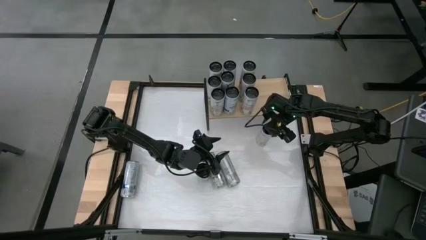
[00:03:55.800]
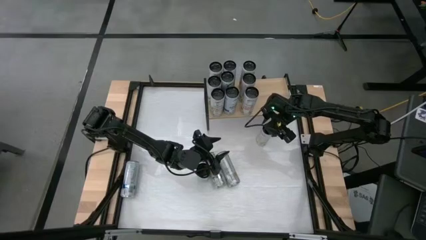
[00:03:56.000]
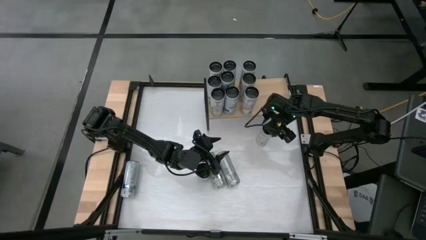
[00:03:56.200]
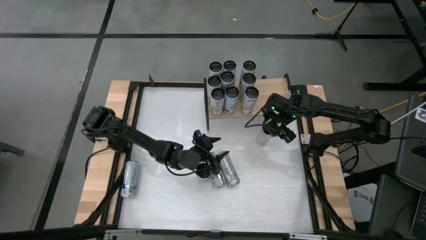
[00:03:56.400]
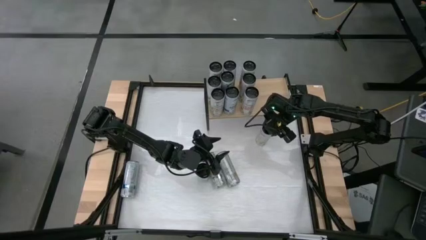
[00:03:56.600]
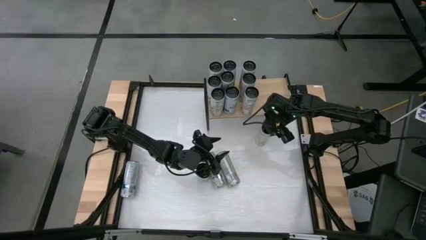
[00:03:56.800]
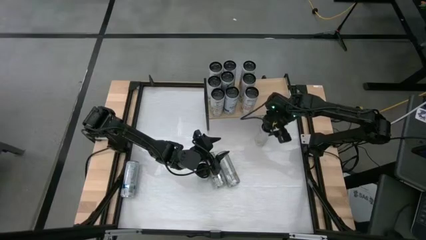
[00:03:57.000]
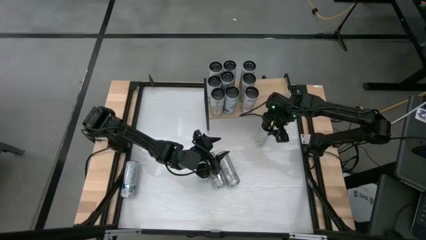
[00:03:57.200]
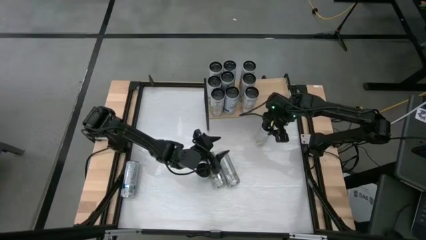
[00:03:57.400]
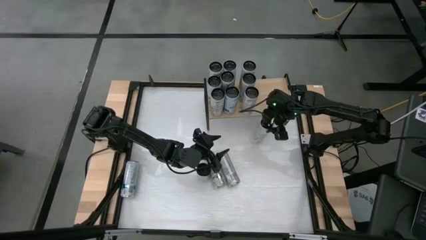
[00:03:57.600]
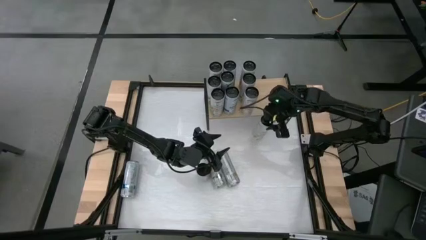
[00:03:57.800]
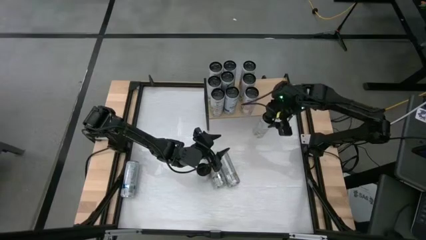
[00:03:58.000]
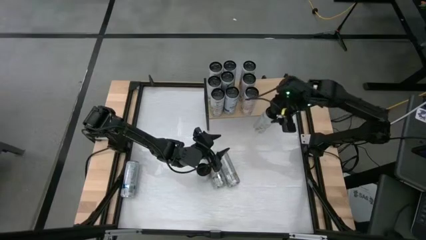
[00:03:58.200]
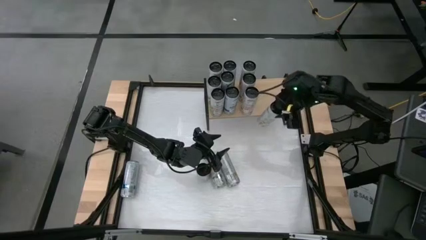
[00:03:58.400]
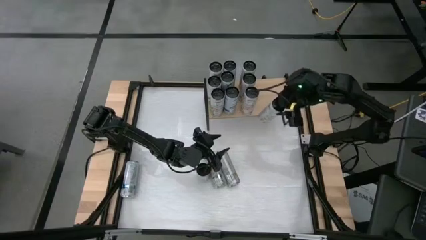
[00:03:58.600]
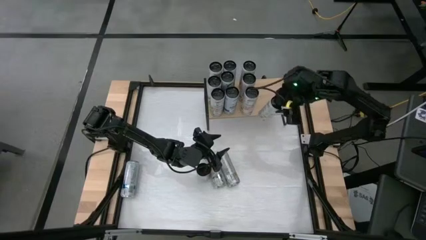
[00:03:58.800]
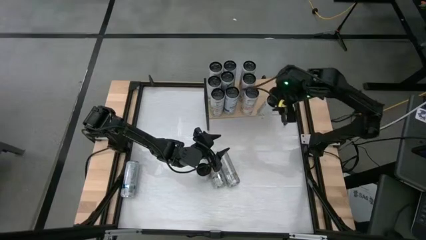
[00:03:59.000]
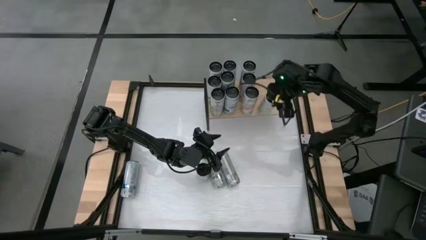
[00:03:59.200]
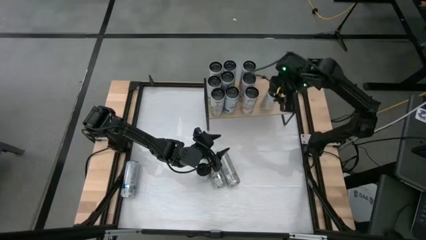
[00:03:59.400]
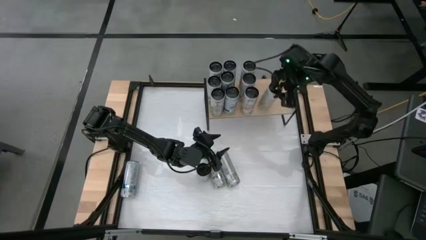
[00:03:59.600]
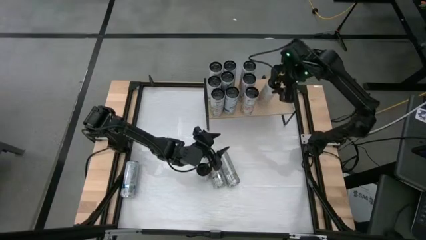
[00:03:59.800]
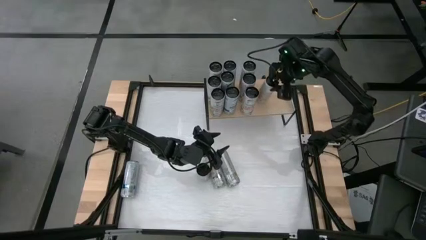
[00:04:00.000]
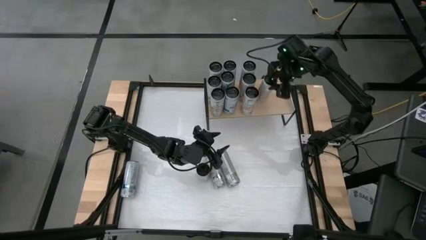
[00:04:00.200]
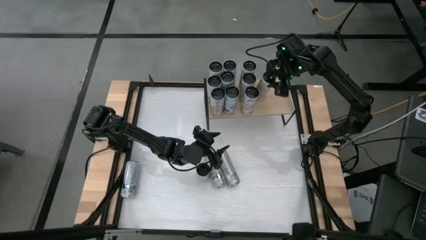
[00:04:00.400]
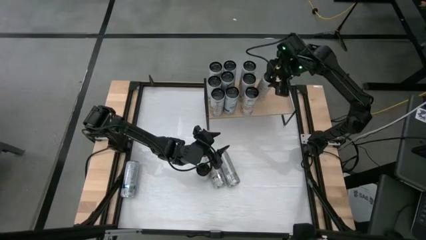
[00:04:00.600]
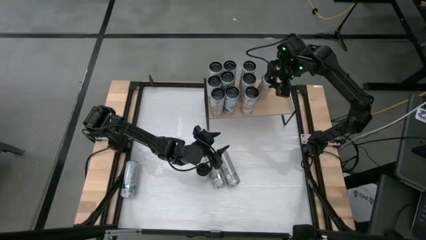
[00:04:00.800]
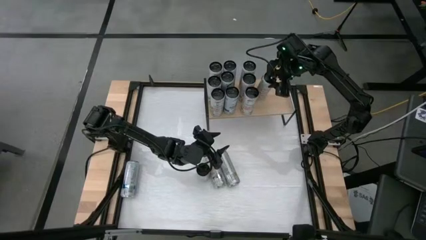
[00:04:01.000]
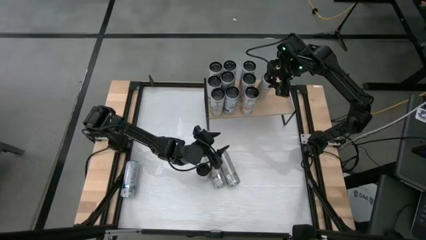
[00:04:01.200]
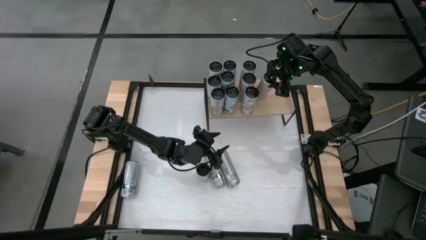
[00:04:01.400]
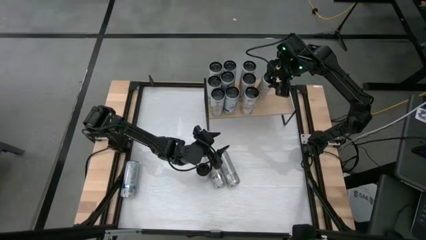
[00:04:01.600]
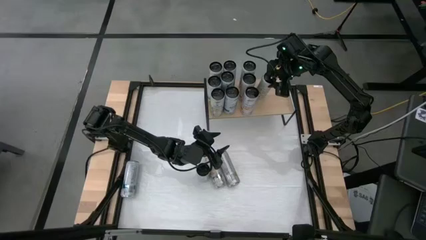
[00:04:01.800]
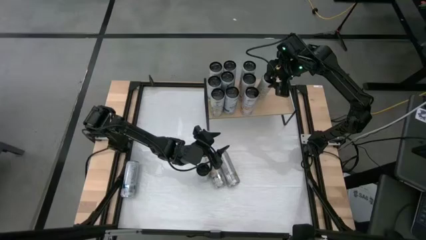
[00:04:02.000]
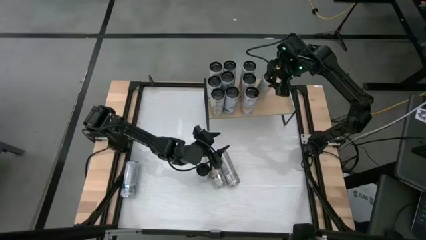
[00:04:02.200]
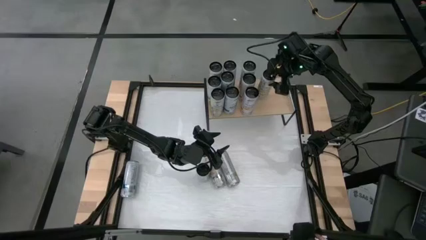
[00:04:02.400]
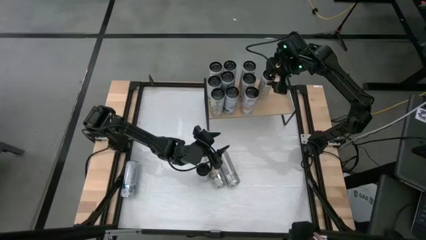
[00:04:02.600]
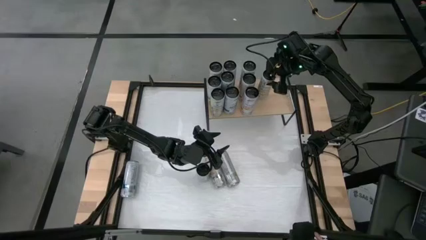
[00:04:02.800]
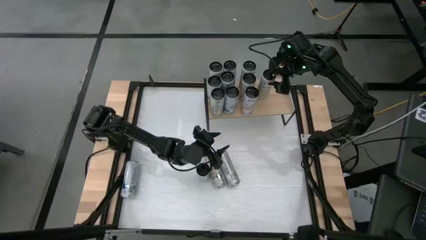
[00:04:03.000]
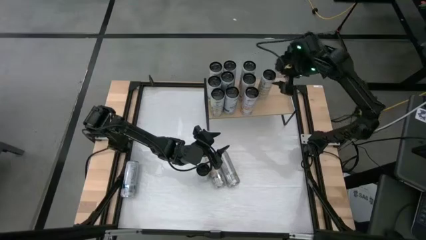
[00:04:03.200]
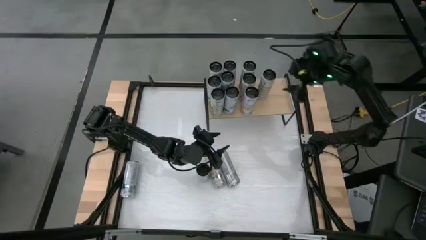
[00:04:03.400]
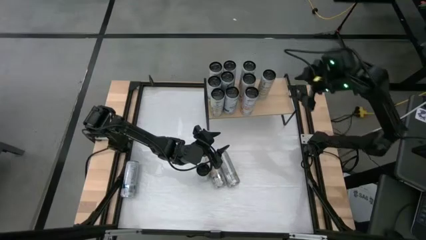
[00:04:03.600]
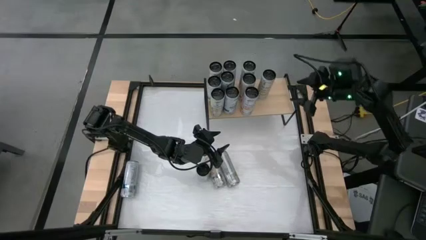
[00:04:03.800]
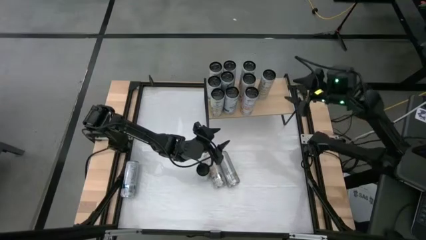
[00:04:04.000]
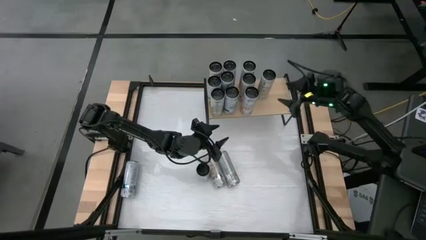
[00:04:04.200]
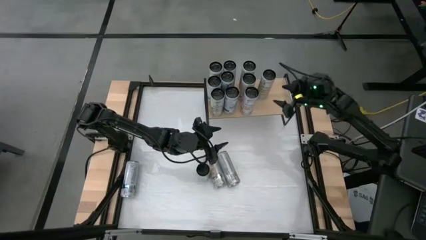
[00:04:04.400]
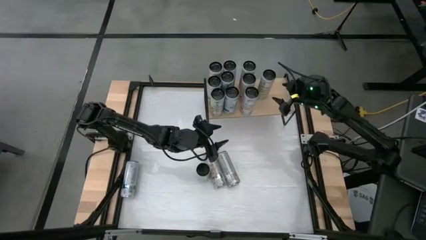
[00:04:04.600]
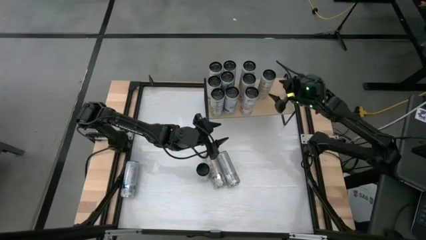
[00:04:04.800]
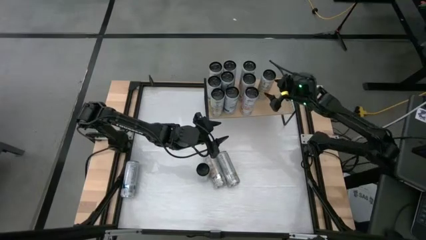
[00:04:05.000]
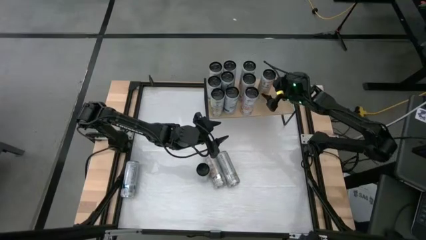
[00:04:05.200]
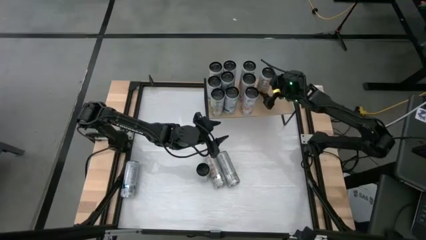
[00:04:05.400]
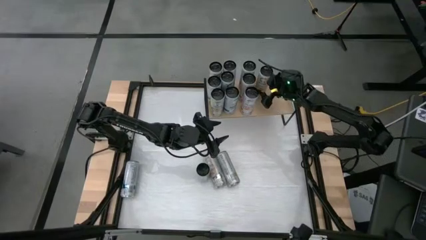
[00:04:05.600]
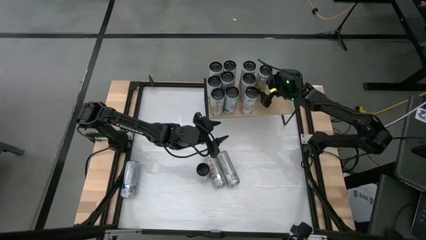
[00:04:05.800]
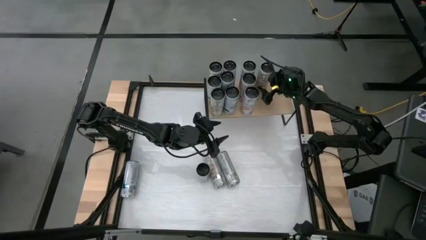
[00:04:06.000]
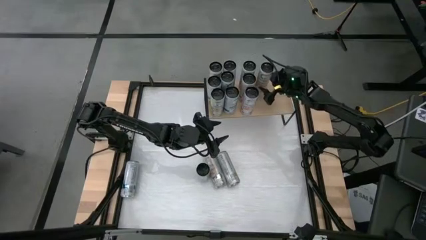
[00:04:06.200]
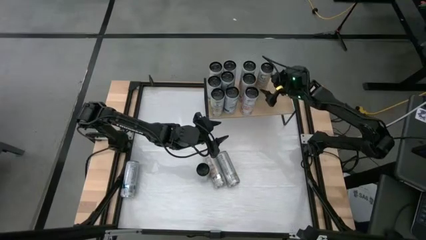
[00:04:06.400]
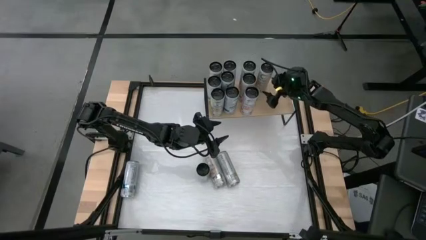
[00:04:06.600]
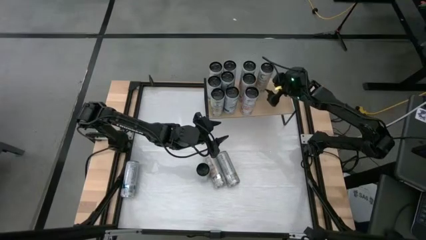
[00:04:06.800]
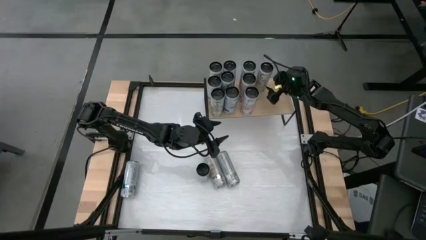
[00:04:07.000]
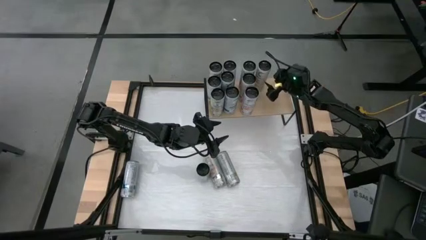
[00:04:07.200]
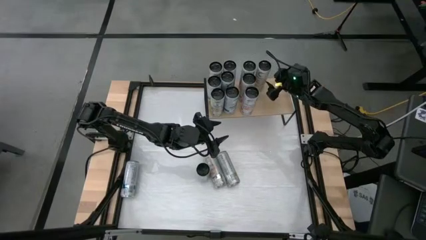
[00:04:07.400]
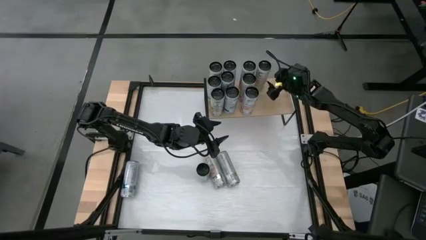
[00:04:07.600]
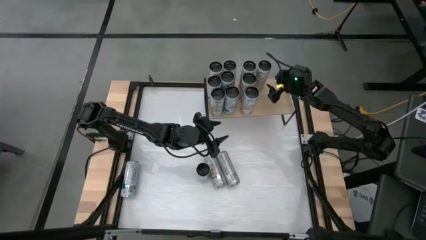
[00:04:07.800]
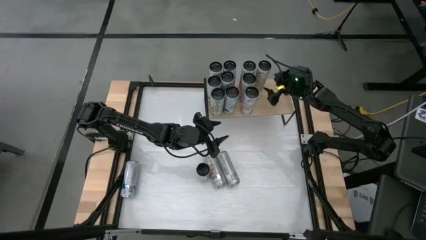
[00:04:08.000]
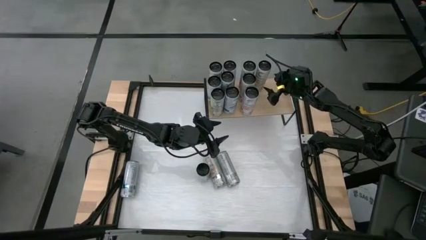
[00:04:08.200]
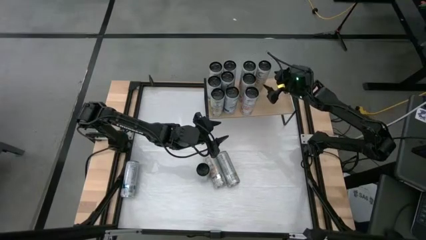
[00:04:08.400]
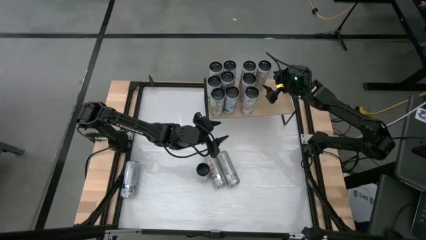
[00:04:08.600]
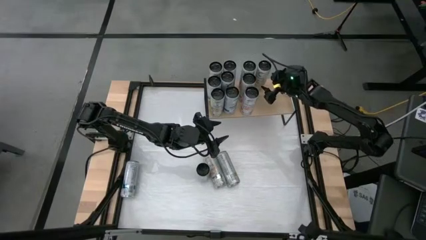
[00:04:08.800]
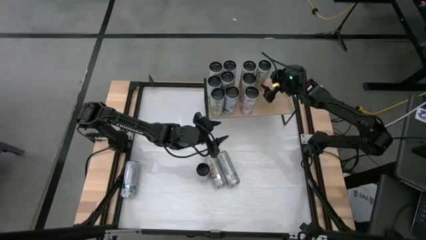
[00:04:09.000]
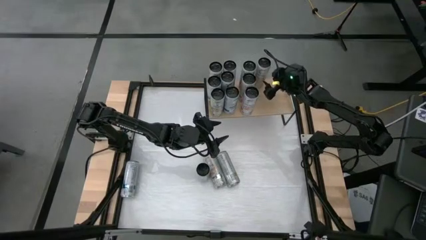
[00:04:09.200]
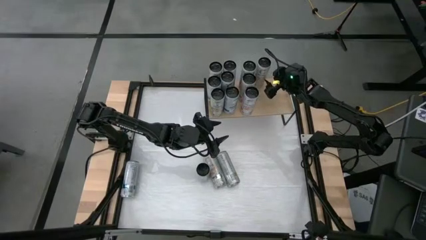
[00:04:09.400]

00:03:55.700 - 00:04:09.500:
Task: Place canned beverage on shelf
Put the orange soda can on the shelf
